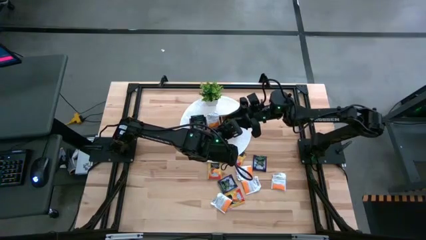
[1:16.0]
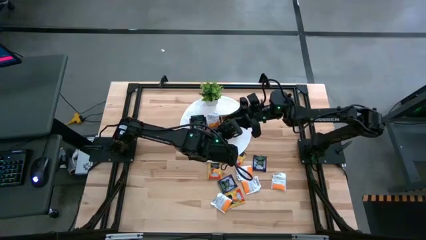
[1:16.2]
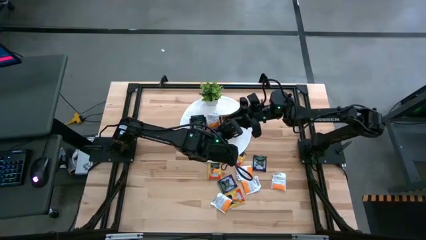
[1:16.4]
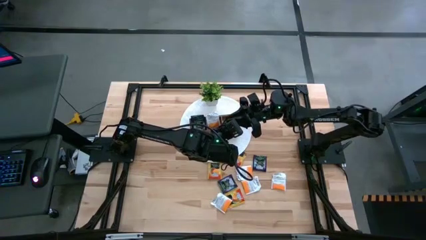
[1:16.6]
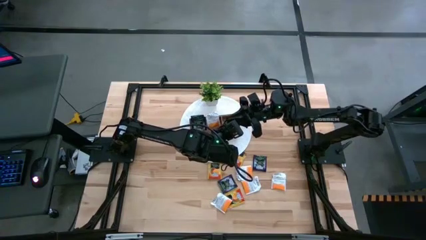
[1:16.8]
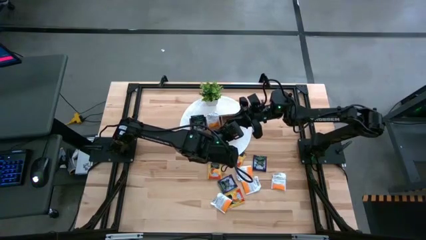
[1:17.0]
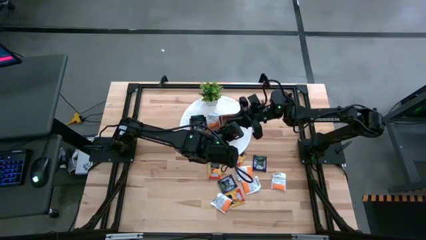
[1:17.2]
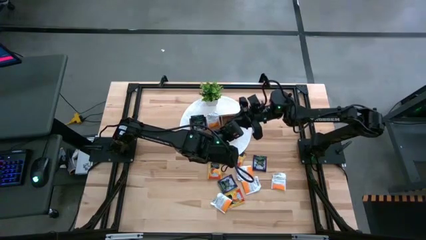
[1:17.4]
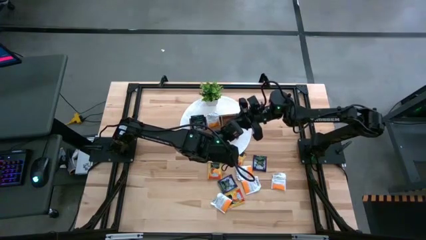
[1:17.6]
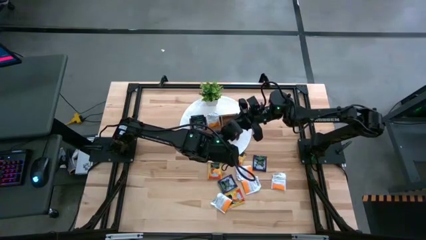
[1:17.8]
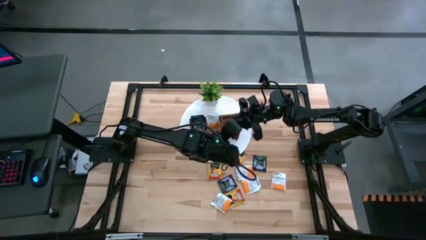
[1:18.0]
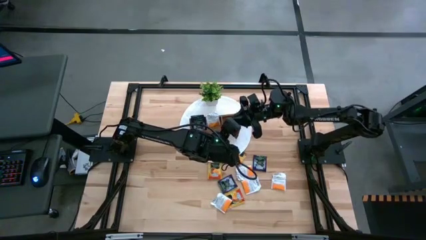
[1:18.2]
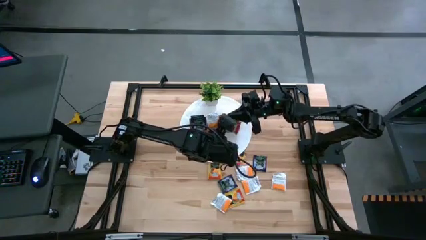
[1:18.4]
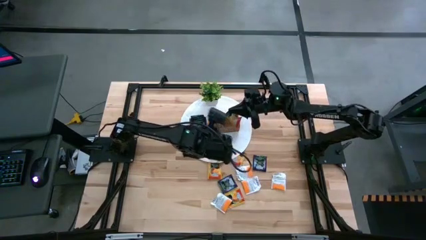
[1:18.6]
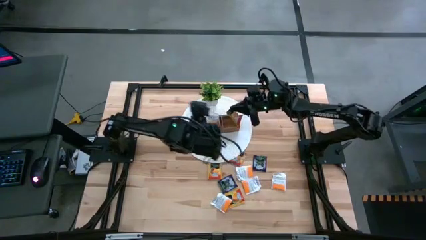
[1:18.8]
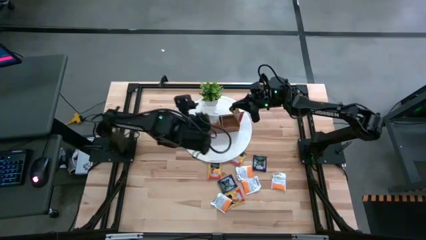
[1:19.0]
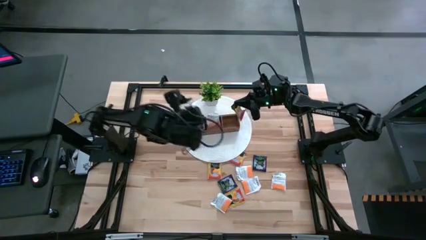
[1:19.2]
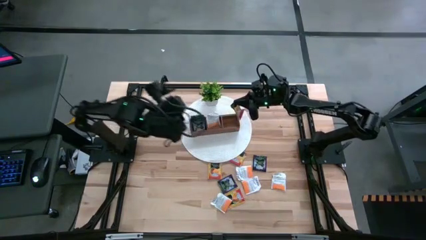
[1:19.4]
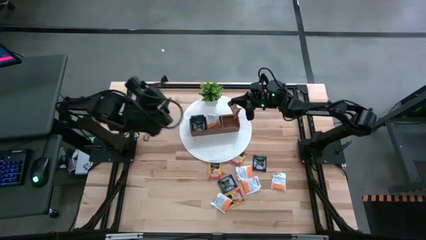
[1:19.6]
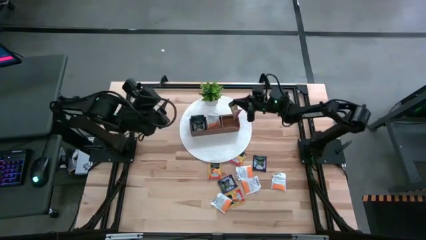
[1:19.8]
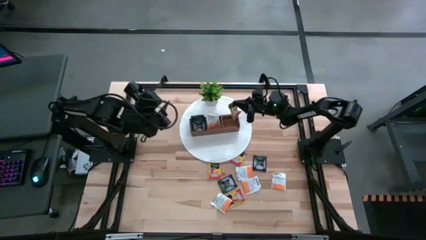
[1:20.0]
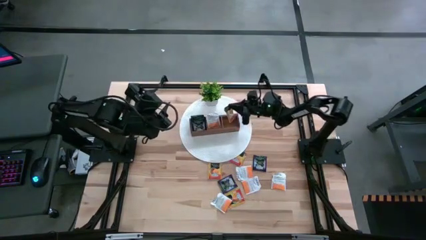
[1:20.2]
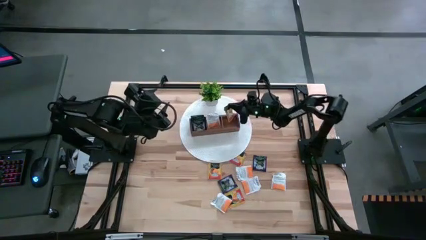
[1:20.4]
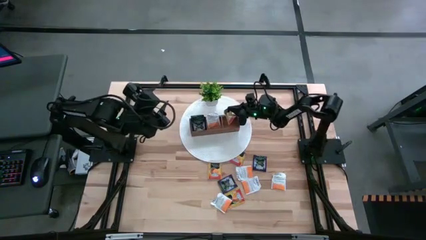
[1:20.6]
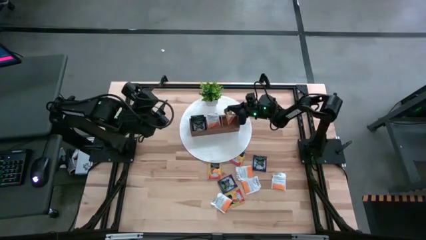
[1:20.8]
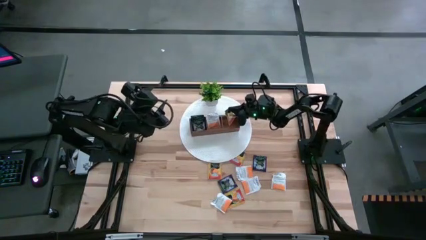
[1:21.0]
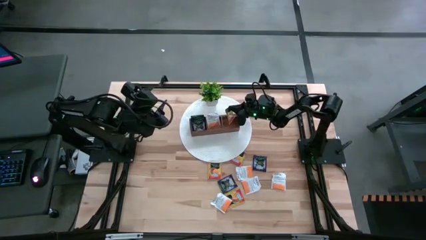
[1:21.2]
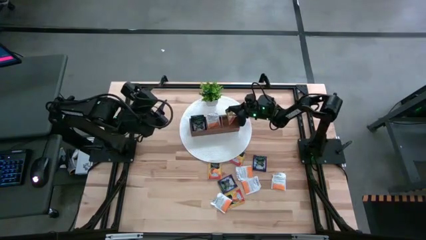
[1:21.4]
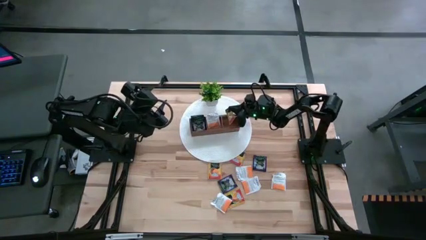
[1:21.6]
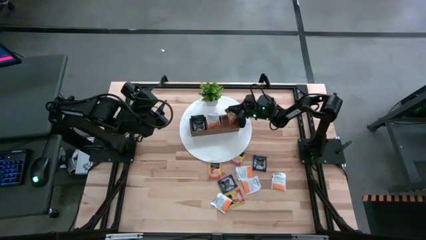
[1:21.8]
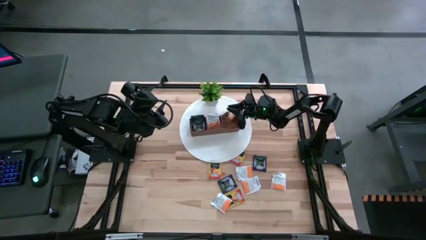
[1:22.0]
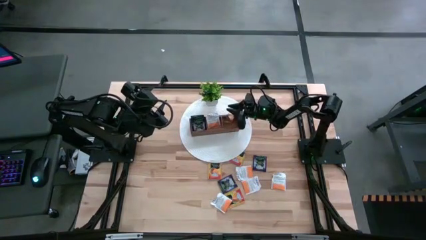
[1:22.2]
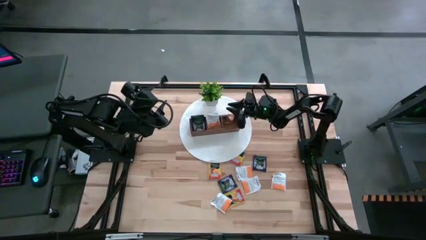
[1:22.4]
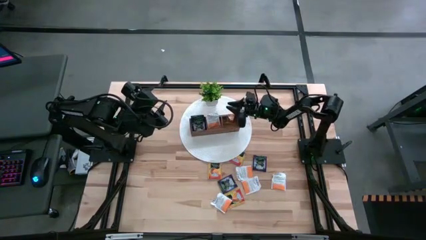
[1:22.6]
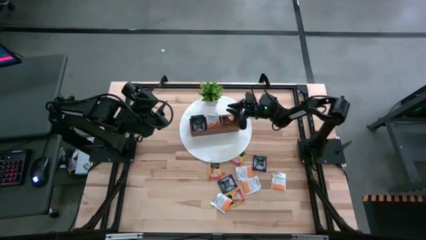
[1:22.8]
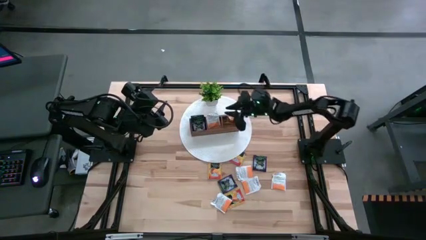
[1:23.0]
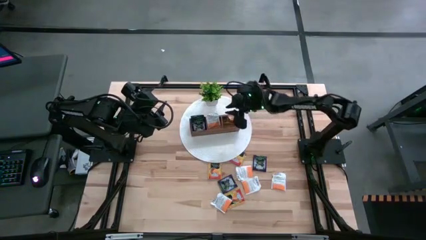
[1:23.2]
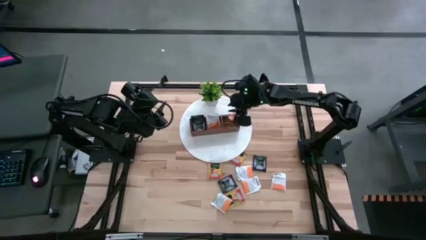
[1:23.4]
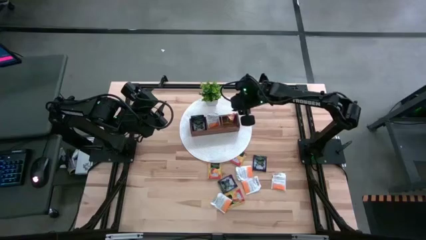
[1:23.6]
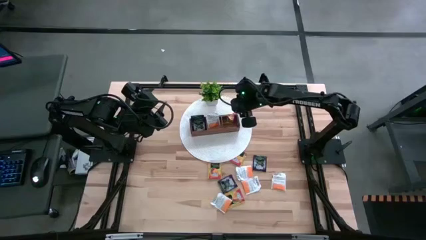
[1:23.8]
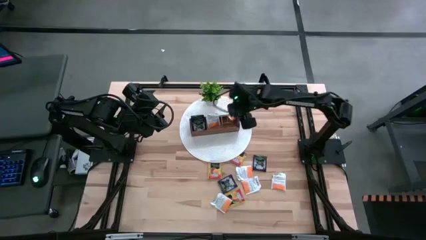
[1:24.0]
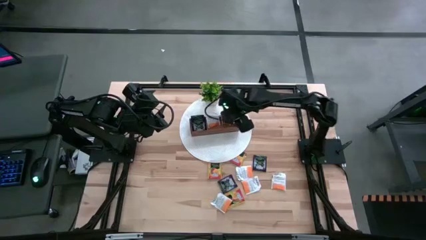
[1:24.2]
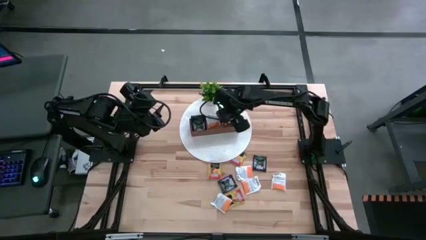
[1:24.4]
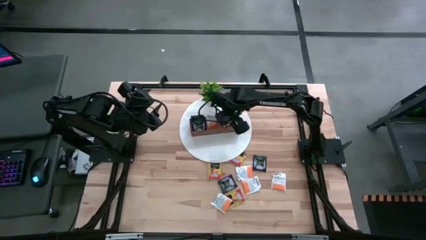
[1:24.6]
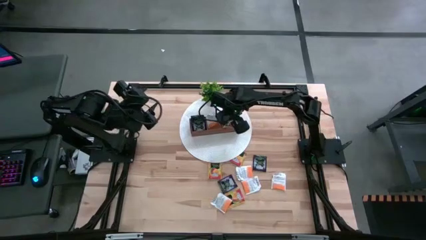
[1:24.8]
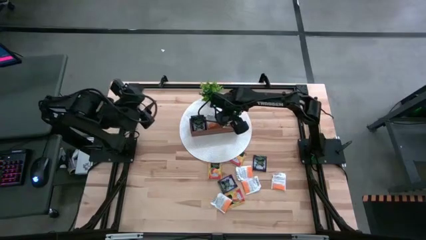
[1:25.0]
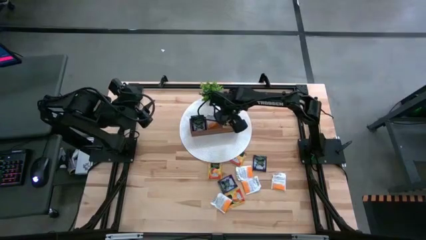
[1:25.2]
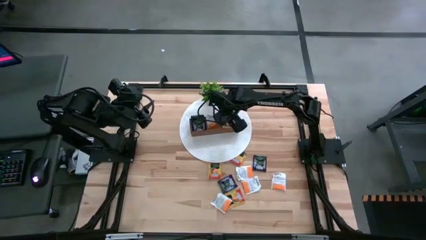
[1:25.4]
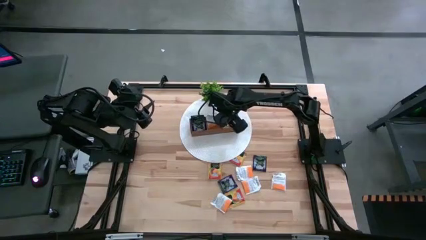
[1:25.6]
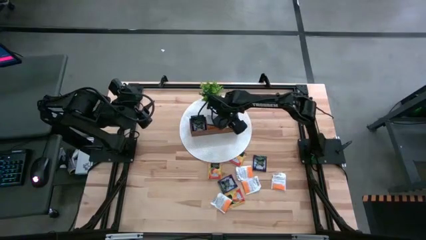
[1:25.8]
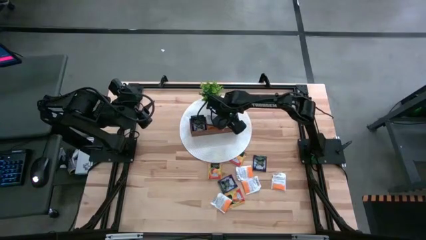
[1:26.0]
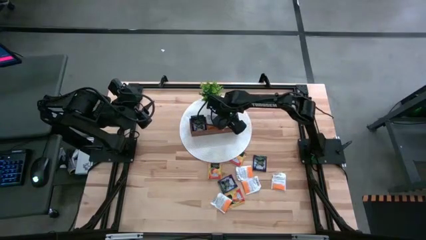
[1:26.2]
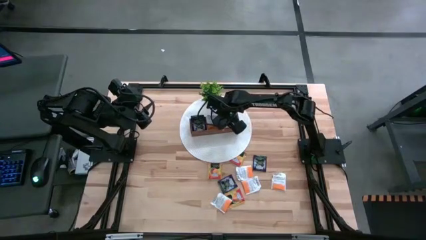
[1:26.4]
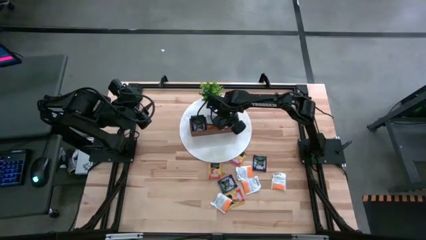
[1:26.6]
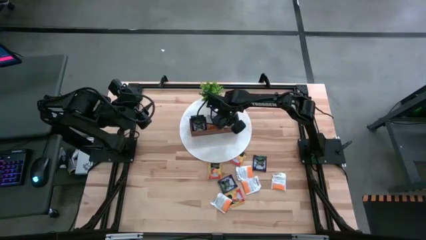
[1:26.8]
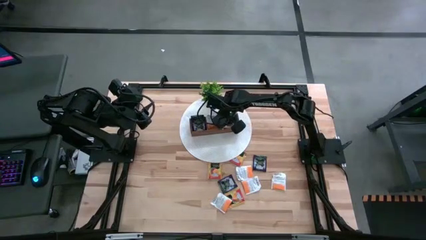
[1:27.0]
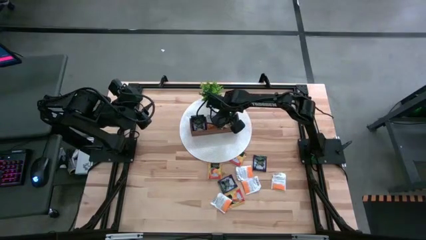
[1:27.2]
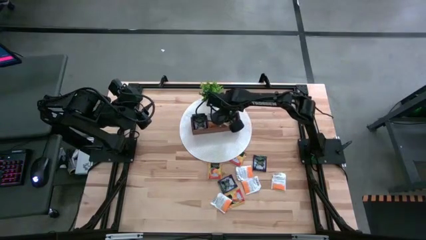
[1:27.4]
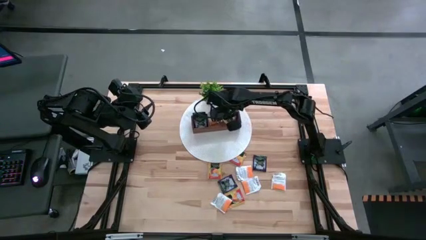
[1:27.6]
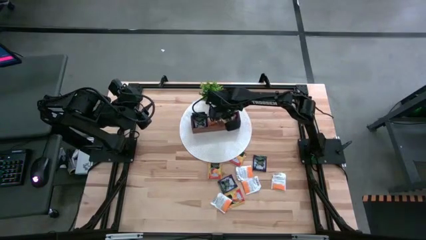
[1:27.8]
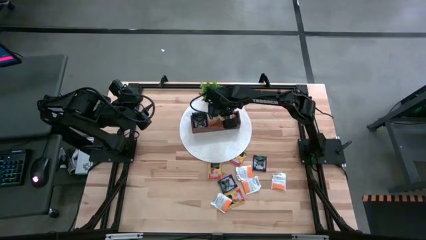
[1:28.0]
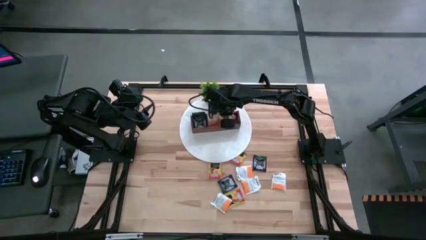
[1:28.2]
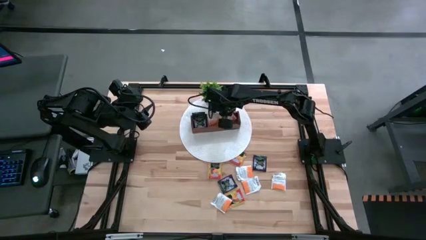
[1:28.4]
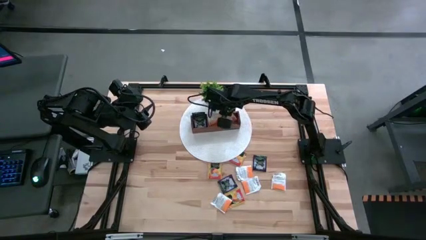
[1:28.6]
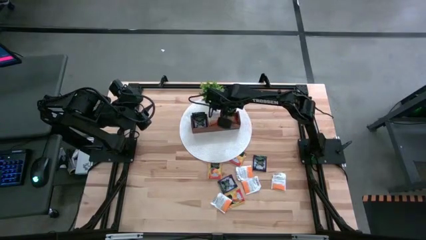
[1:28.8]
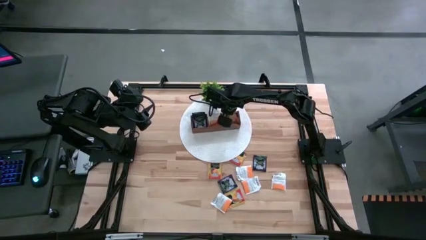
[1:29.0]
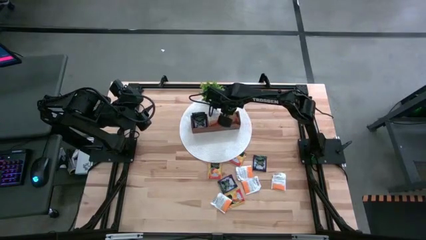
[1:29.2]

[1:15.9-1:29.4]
Task: Pick & Place Tea
Put the orange tea bag into the right section of the wooden organizer

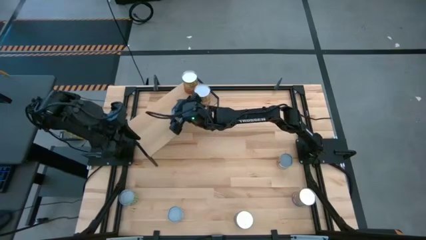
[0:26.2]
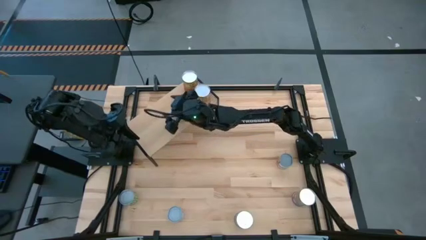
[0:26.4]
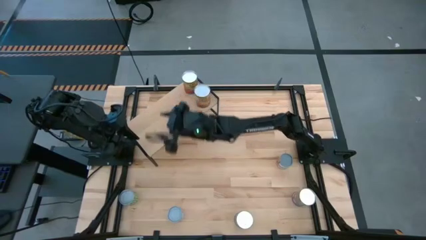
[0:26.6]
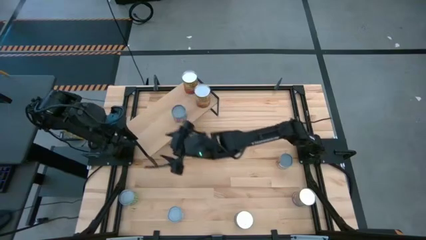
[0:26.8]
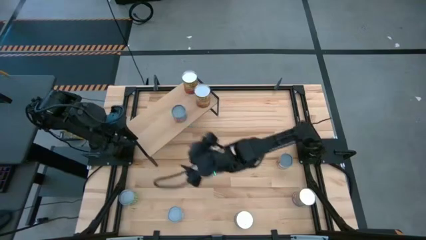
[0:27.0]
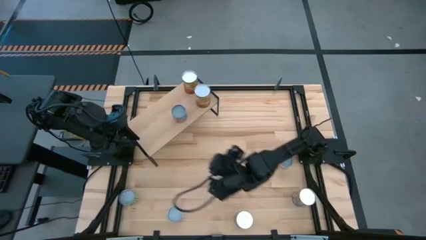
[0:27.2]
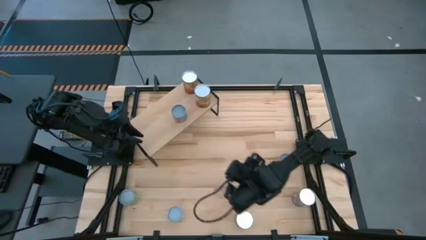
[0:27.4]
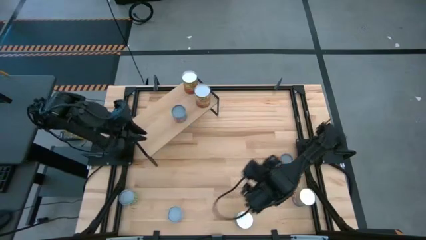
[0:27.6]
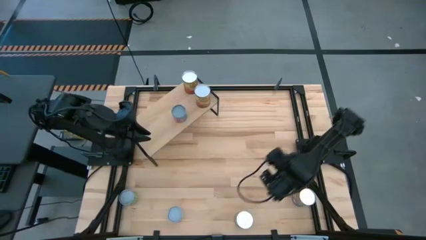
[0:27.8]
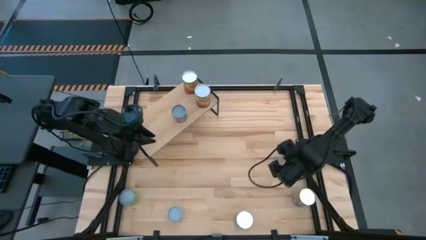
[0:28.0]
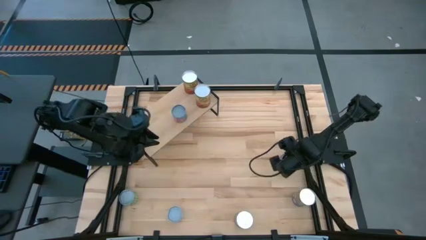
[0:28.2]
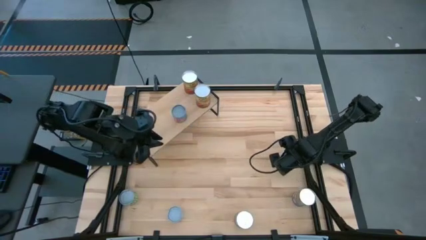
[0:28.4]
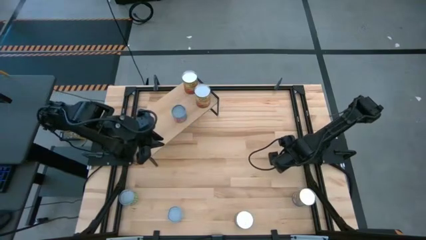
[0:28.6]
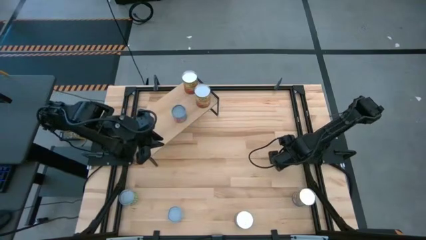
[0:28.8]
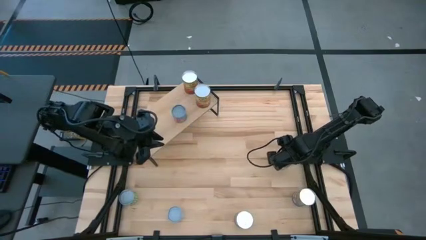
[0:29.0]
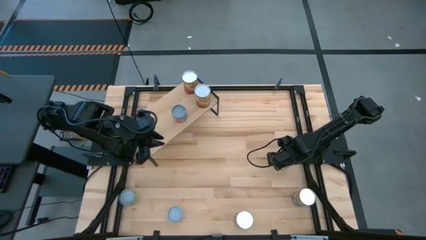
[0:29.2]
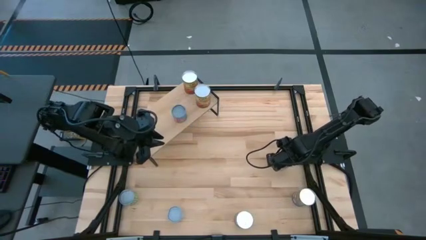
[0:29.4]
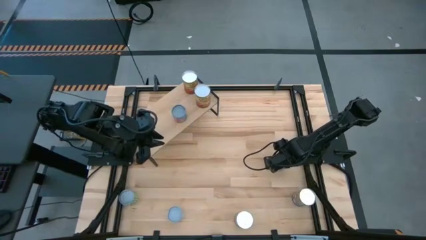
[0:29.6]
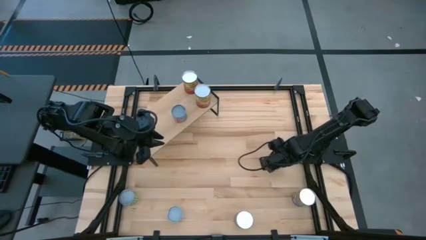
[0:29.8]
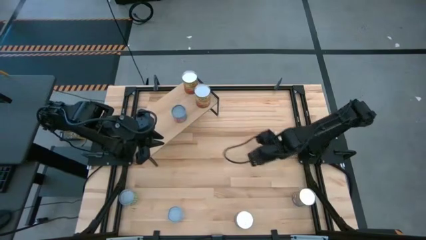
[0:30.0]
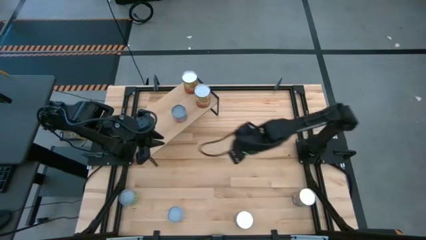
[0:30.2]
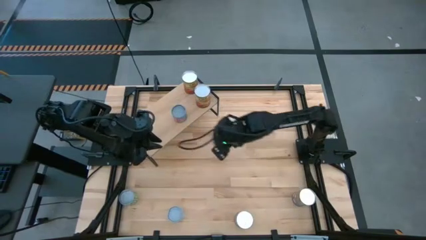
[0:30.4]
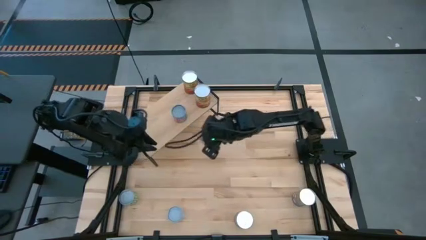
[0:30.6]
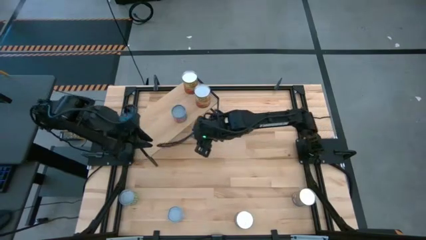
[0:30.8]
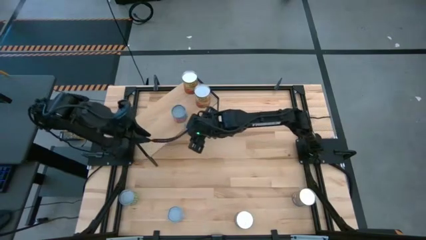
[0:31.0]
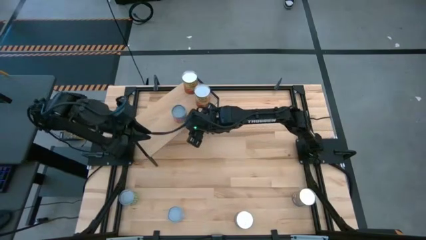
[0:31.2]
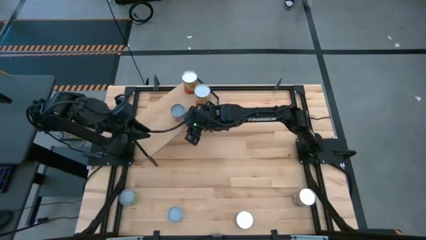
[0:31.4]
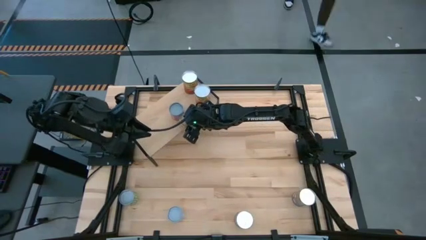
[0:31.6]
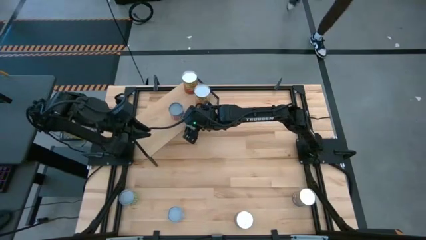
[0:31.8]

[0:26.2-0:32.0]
Task: Pick and place cans onto a shelf
Put the canned oranges on the shelf
